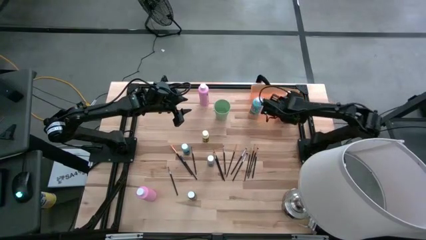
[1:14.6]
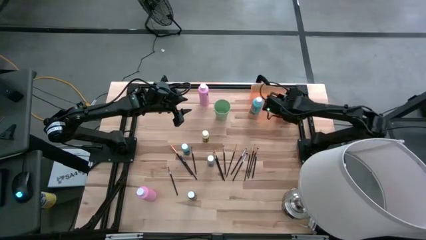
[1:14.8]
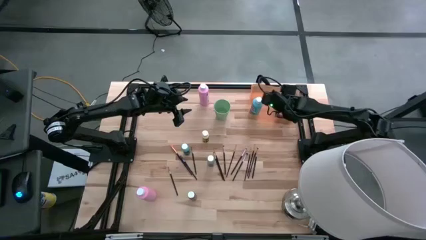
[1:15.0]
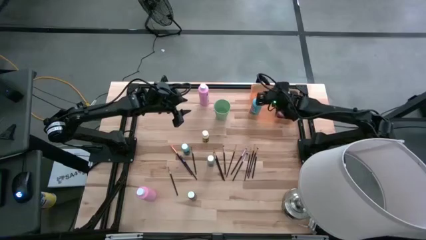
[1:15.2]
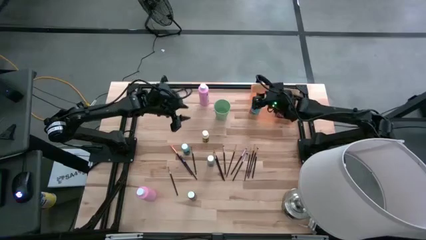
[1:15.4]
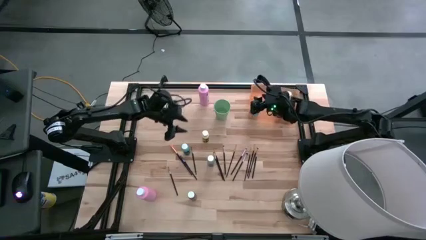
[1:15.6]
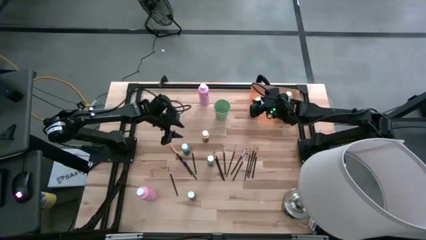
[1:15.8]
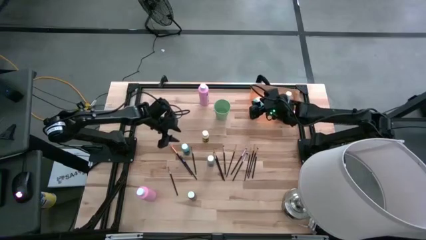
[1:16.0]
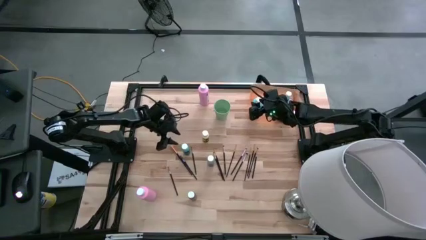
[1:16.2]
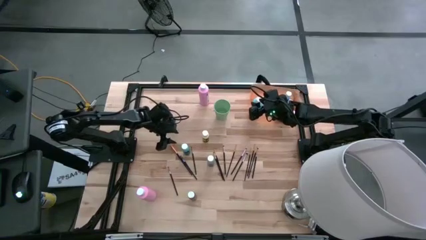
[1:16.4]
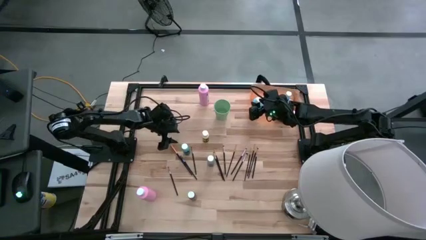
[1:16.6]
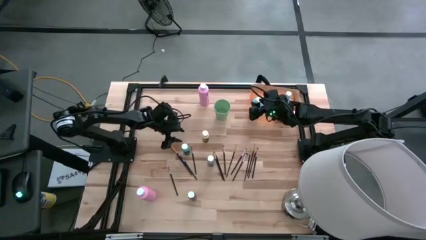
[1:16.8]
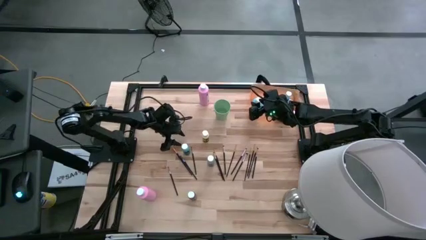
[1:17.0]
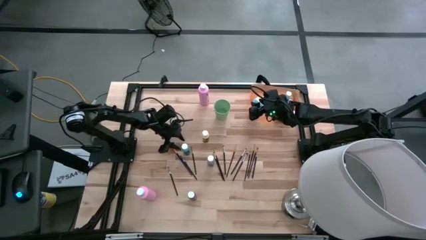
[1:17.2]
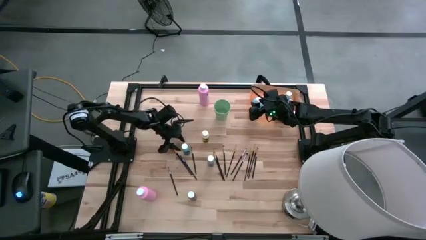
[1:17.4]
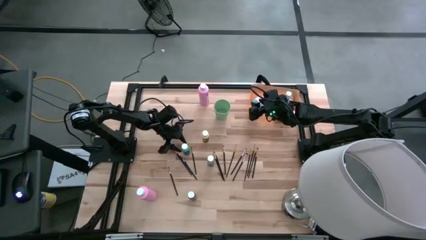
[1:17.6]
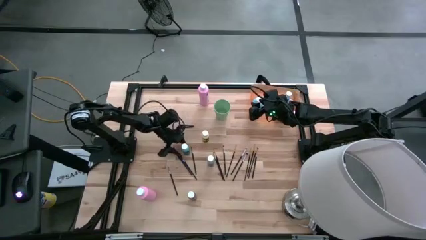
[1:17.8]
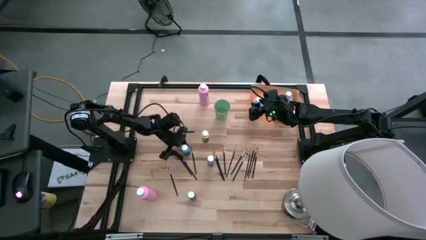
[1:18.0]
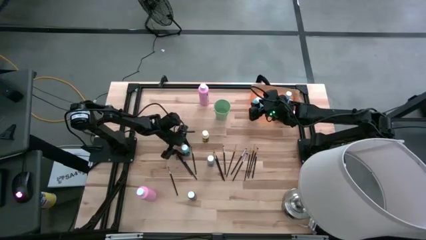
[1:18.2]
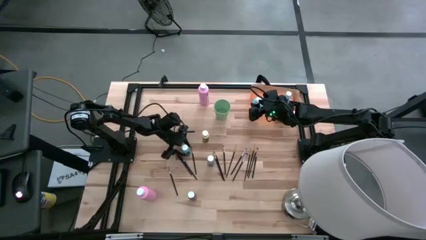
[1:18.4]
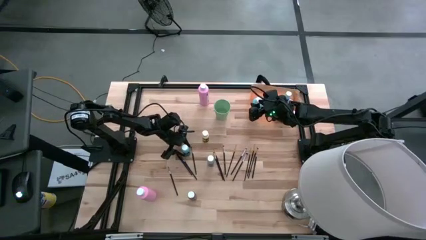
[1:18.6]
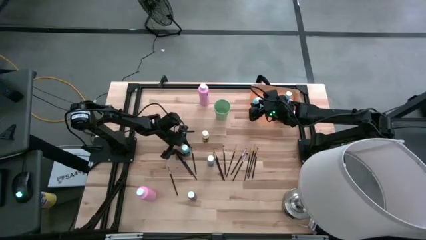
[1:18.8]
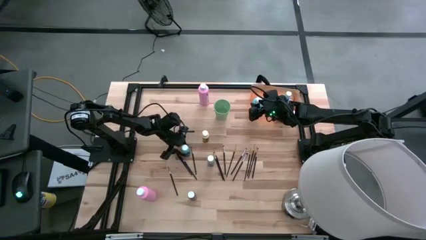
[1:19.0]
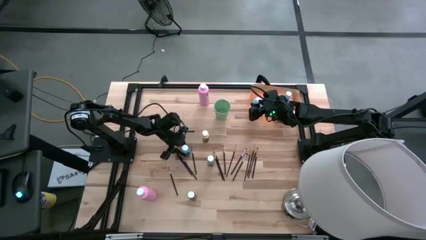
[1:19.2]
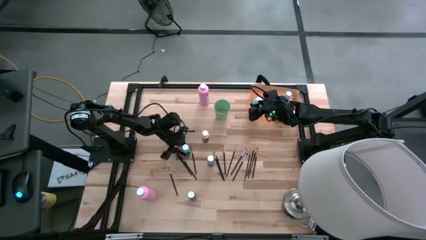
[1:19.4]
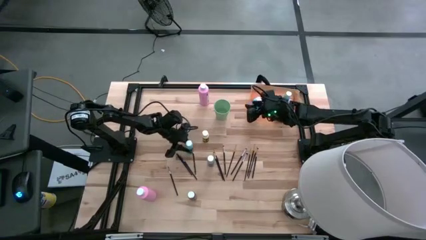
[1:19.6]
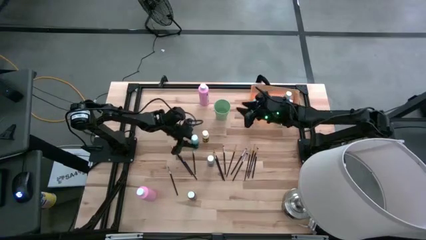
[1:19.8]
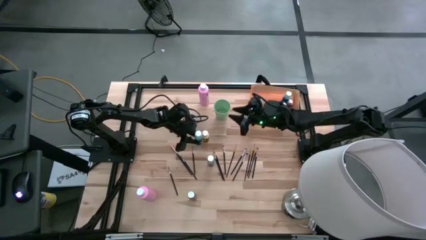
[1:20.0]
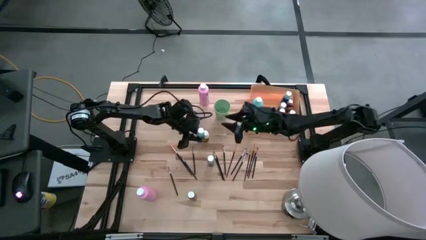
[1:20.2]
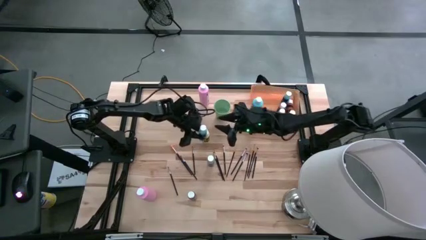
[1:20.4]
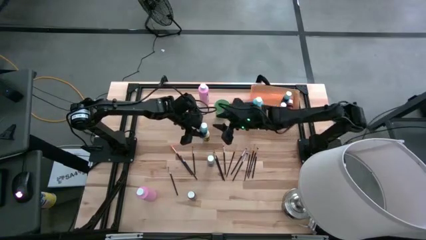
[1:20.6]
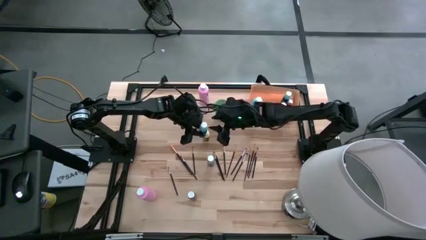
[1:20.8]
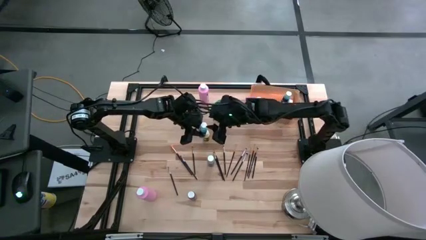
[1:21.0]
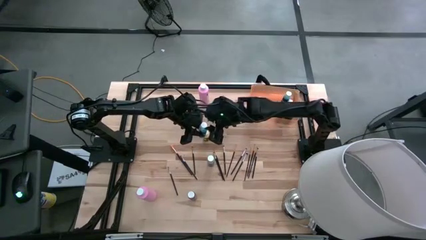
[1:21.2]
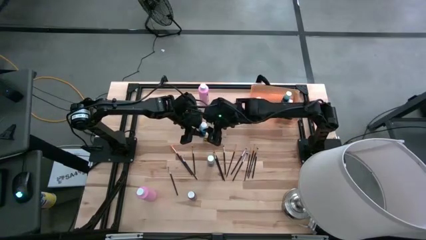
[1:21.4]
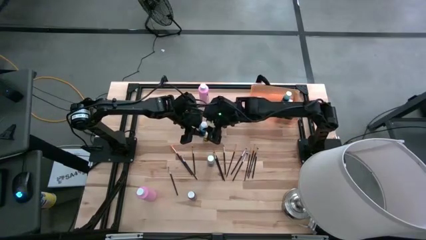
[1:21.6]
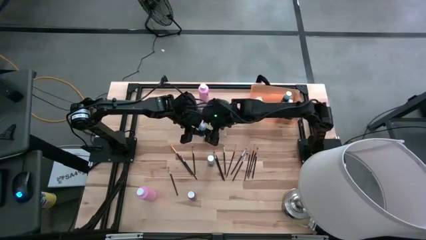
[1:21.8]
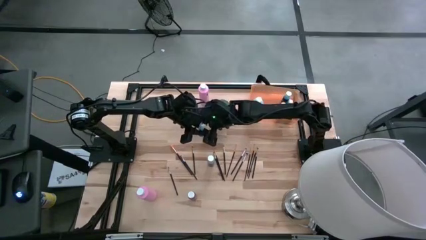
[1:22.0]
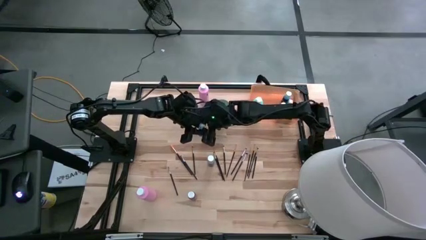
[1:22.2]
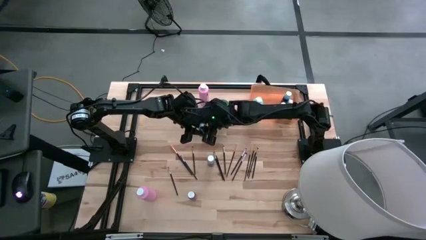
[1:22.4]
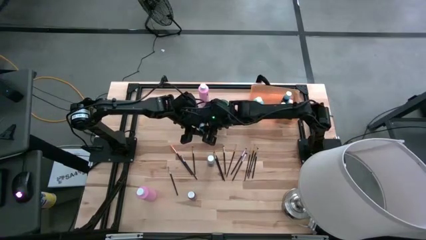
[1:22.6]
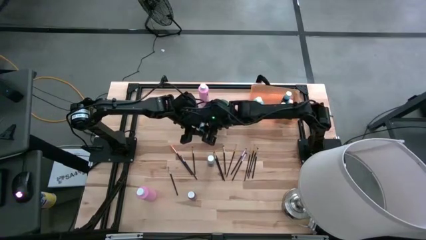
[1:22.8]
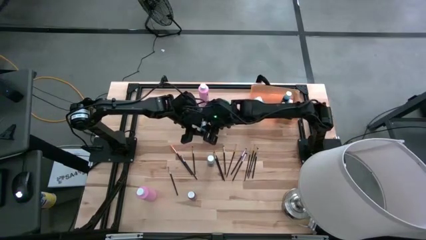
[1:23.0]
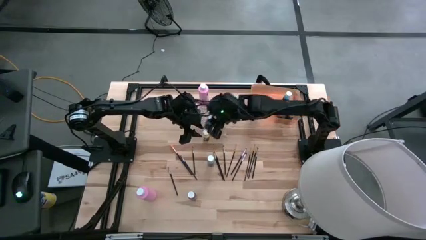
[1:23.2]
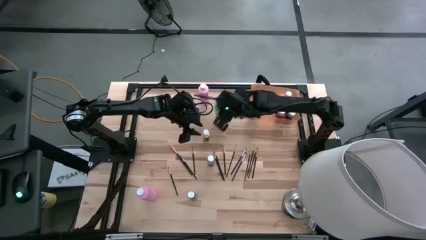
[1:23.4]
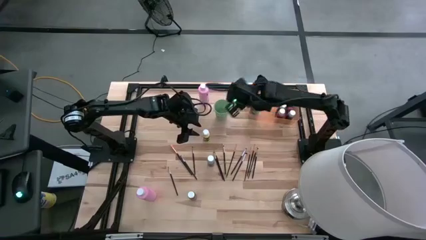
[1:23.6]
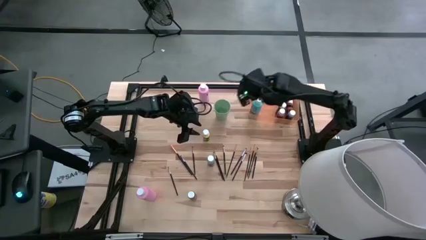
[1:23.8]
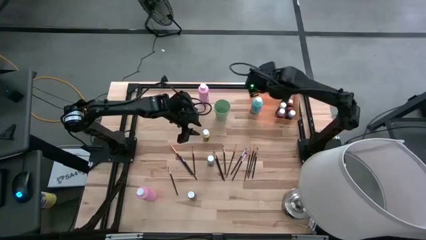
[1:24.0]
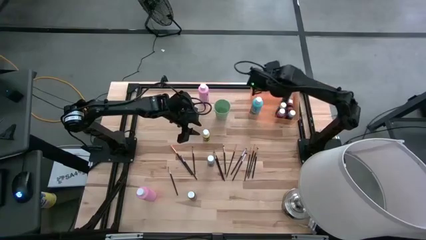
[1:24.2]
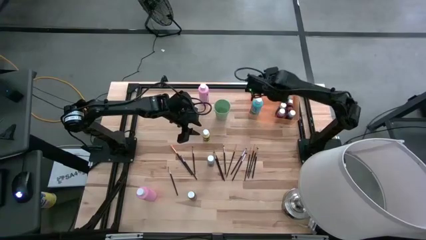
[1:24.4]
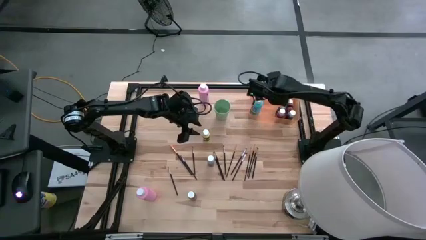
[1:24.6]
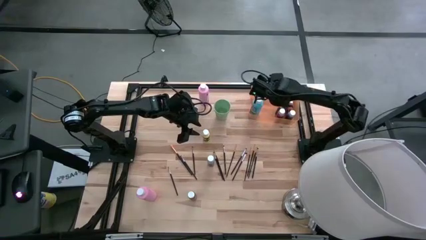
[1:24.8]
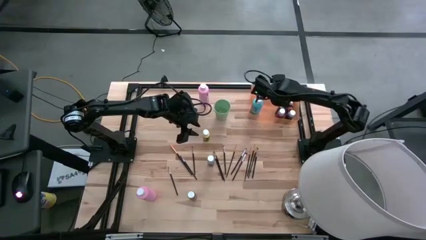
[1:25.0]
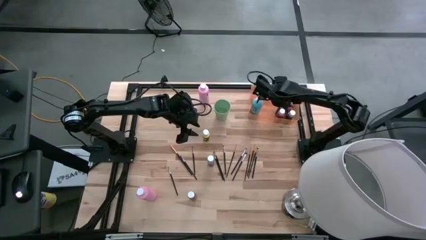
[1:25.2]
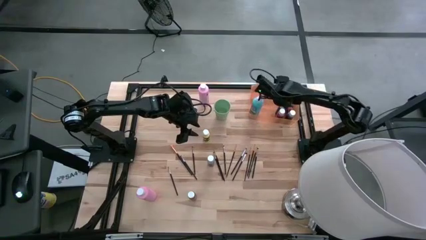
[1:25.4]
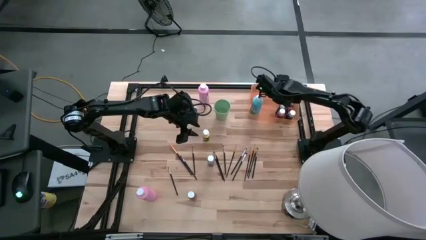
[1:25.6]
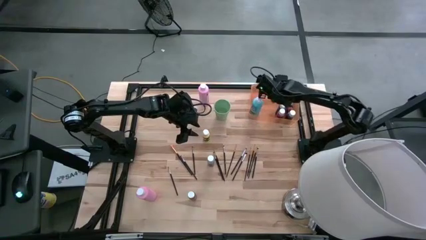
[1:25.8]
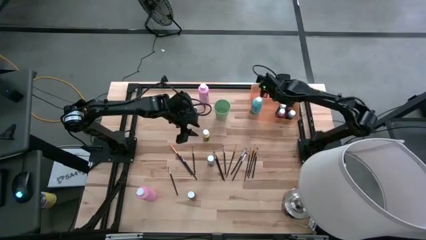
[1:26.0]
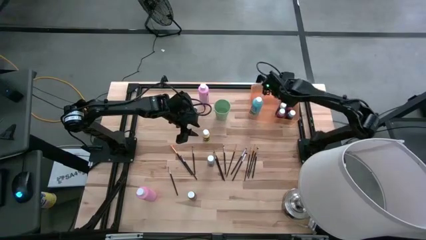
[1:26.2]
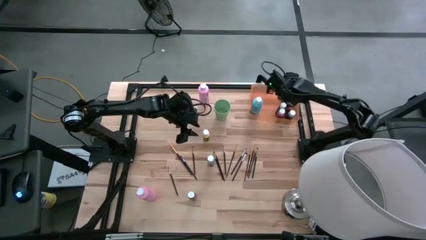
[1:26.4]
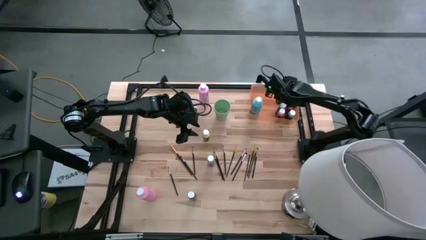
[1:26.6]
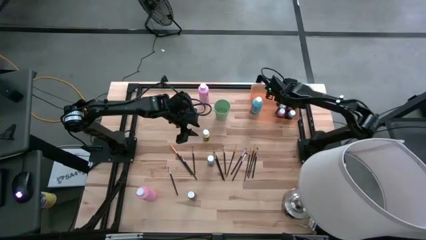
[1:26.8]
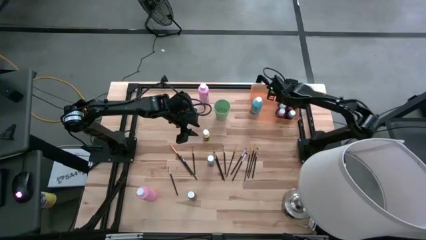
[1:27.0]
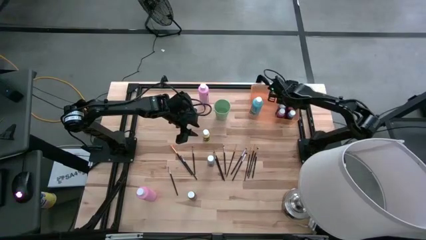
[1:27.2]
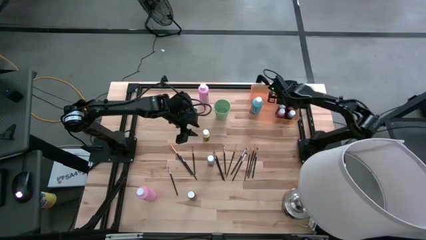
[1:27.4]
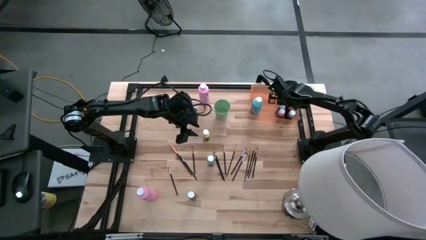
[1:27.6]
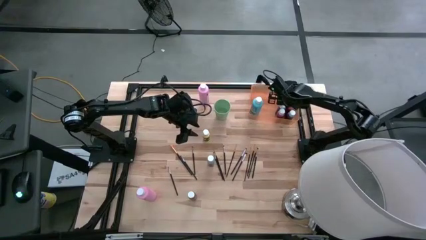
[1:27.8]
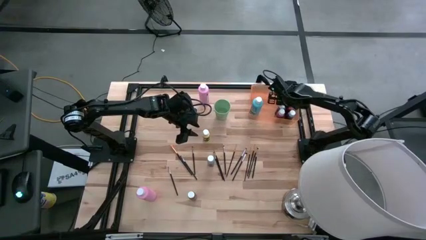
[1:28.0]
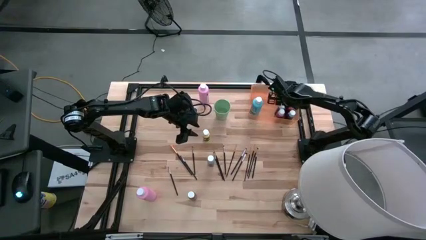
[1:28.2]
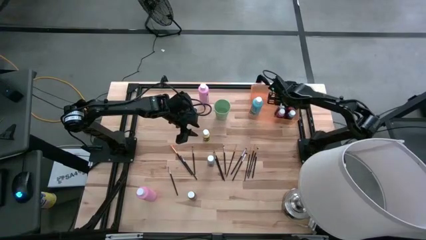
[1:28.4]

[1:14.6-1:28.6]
Task: Pick & Place Paint Supplies
Put the small blue paint bottle into the orange bin
